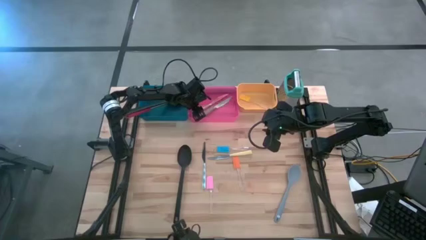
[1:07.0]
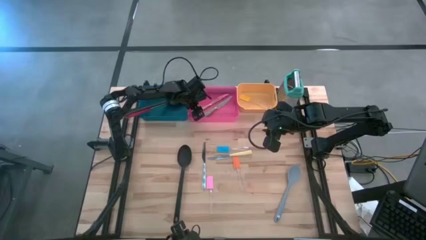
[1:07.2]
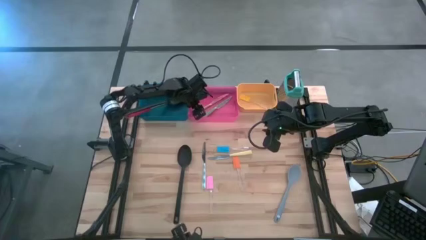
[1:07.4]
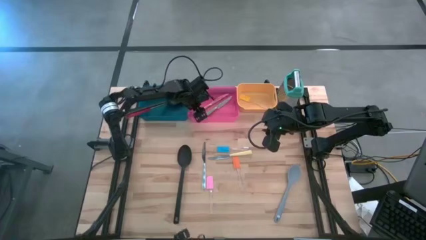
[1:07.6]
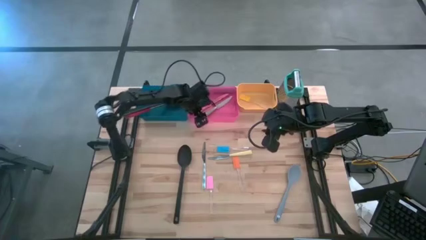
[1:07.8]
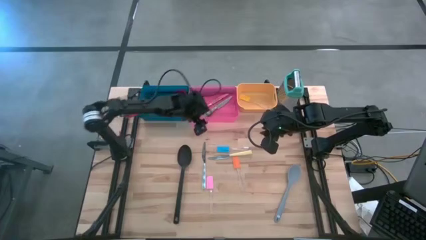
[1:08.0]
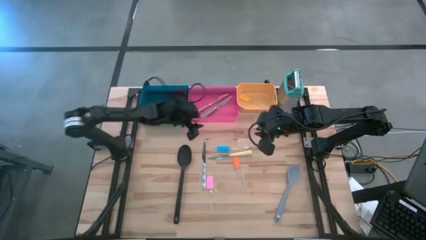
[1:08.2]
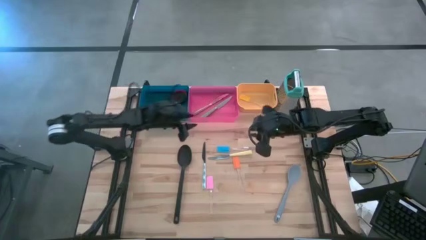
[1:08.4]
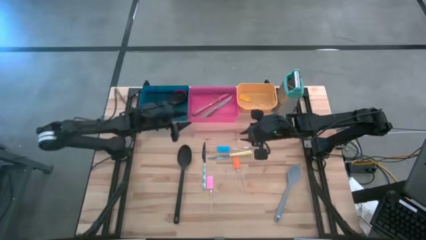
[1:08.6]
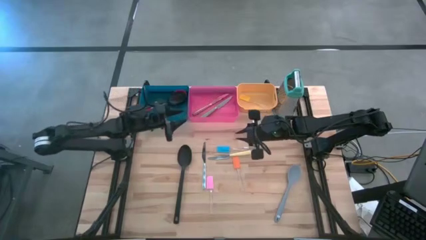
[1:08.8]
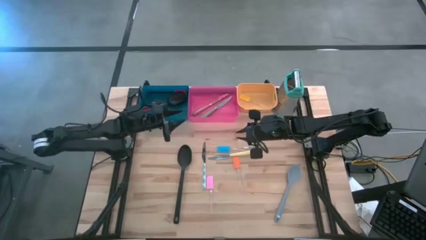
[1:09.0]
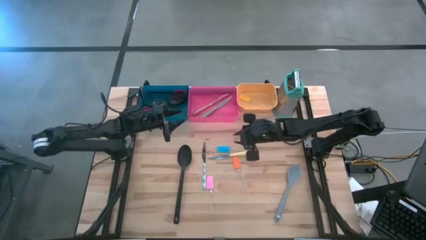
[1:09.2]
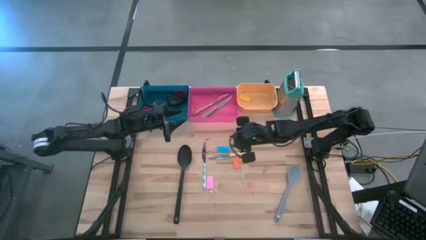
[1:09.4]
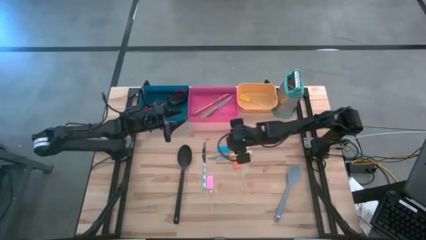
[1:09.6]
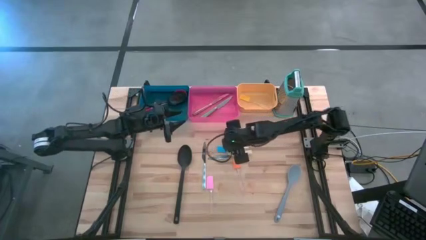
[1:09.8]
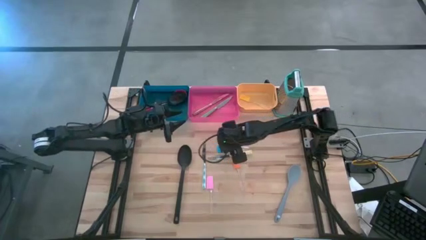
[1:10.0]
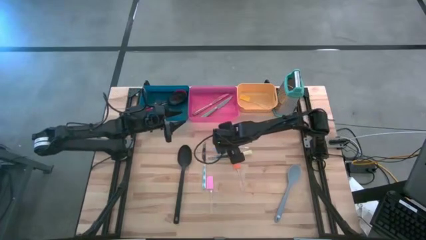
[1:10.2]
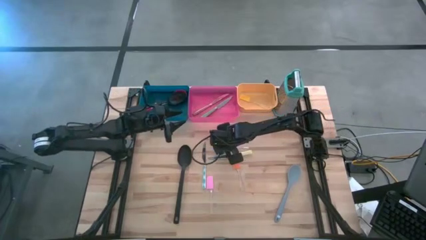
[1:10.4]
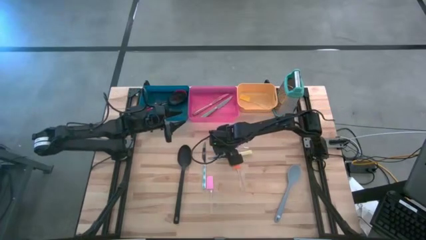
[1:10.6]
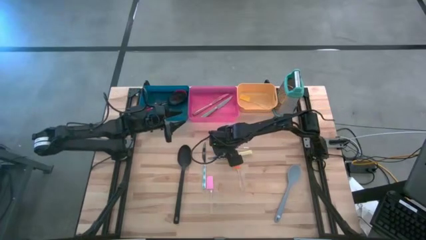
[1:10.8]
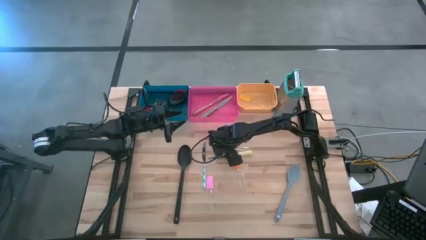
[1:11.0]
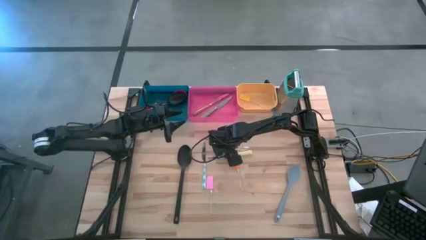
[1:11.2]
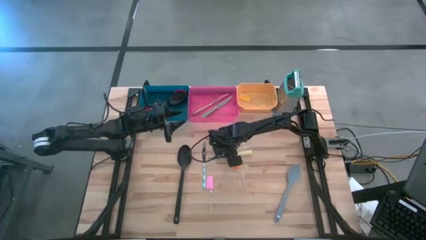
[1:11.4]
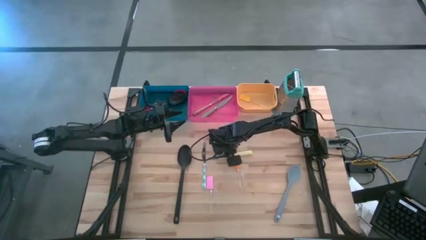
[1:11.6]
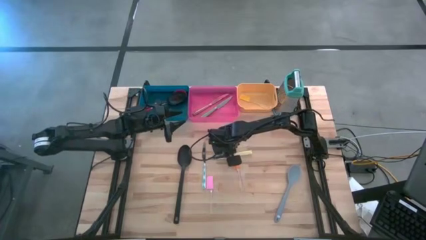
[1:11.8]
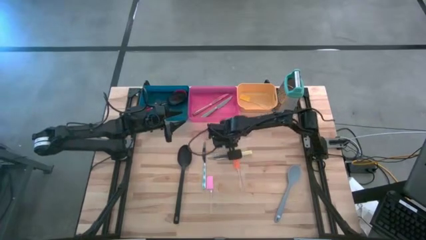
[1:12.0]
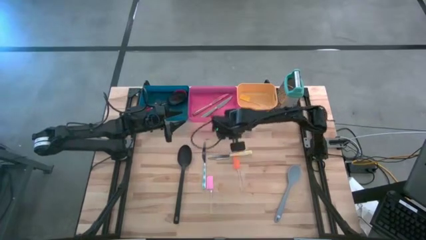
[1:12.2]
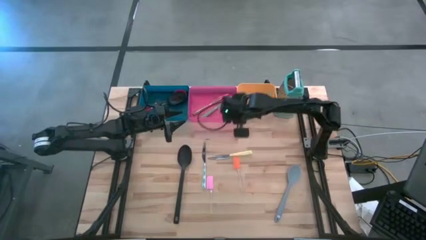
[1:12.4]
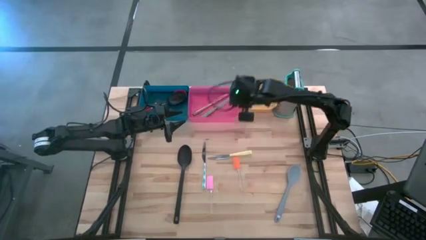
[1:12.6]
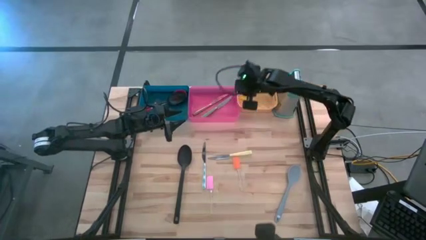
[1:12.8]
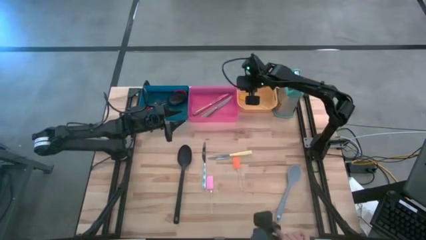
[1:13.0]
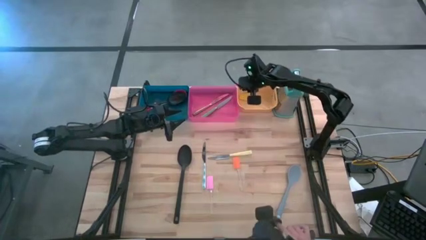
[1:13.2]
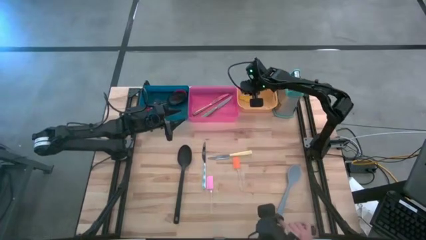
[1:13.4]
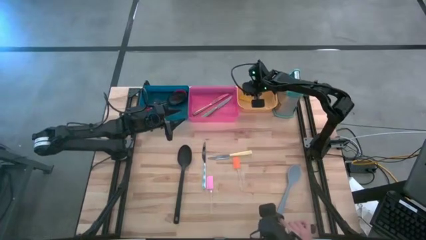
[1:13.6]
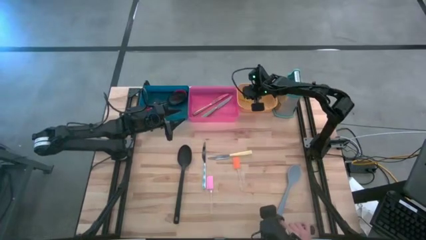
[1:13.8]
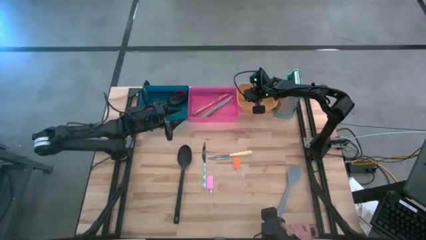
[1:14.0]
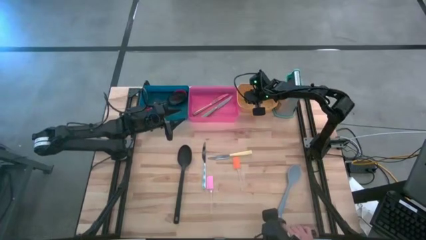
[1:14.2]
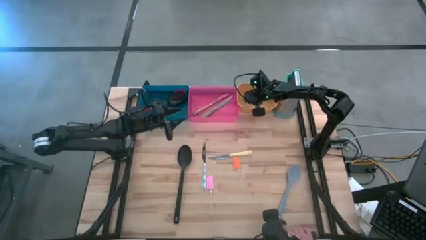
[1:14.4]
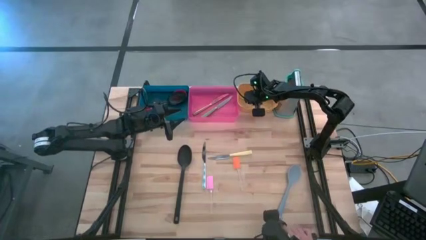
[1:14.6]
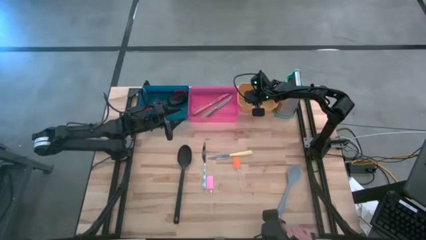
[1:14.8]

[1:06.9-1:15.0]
Task: Pick & Place Kitchen Items
Put the blue spatula into the yellow bin

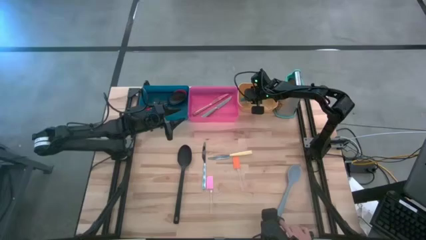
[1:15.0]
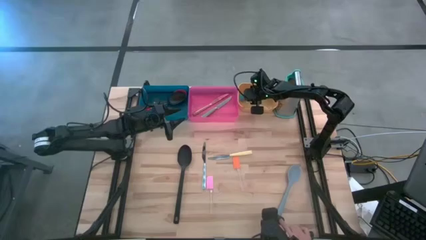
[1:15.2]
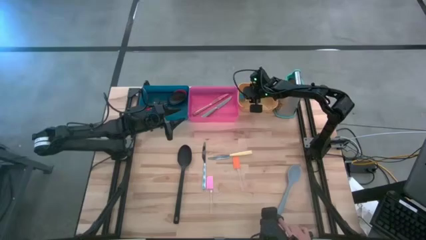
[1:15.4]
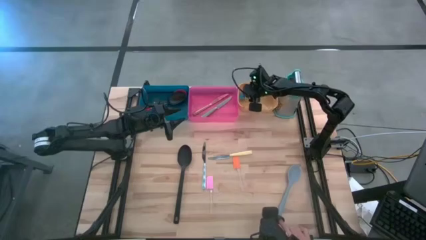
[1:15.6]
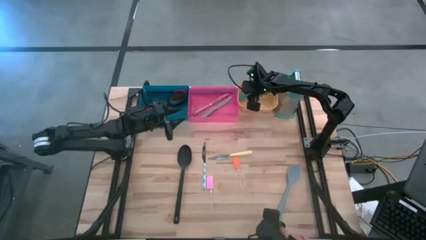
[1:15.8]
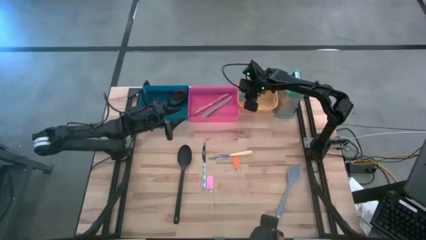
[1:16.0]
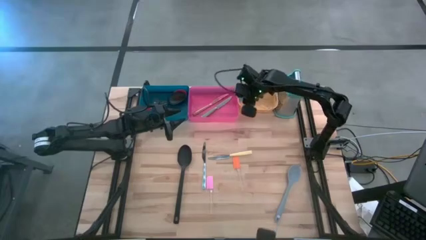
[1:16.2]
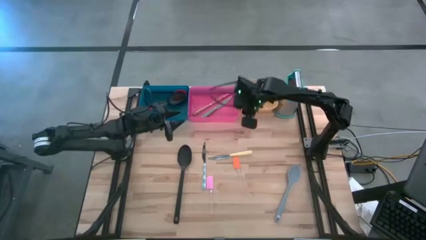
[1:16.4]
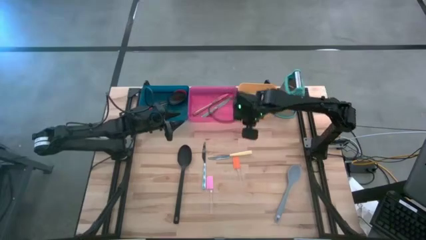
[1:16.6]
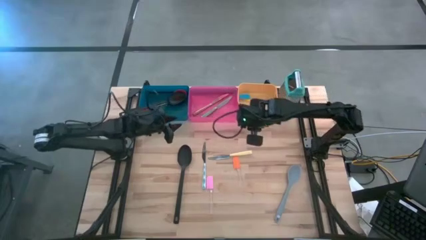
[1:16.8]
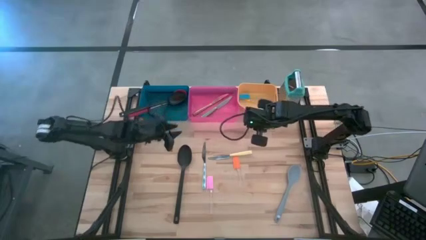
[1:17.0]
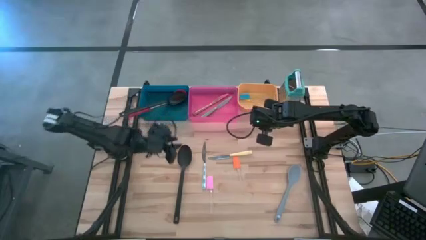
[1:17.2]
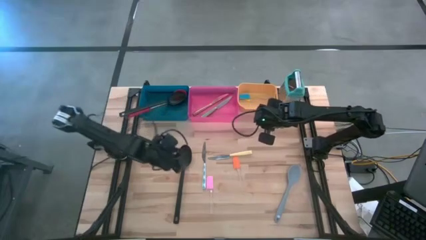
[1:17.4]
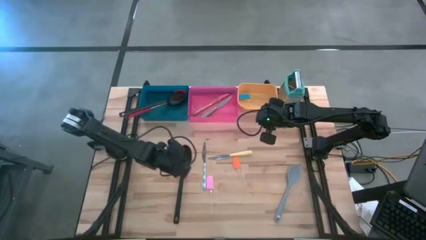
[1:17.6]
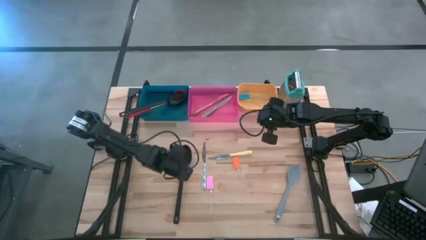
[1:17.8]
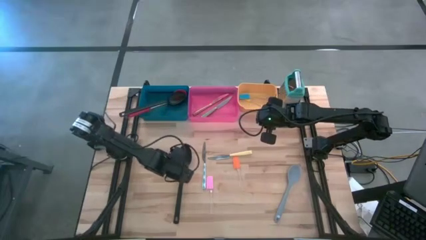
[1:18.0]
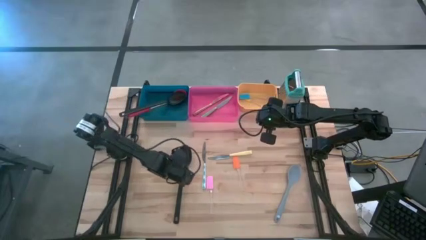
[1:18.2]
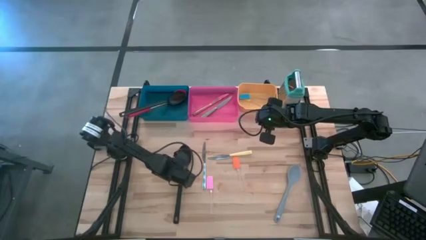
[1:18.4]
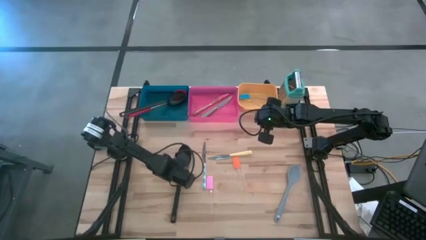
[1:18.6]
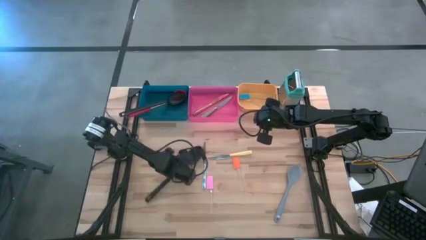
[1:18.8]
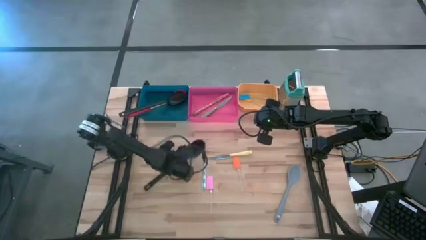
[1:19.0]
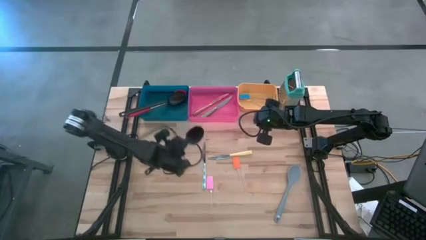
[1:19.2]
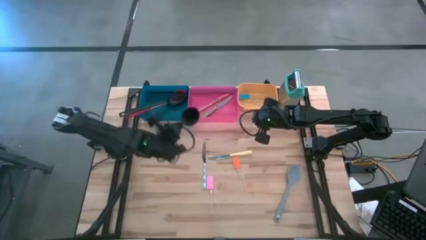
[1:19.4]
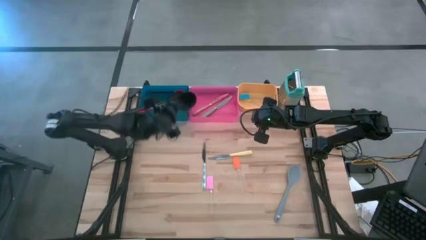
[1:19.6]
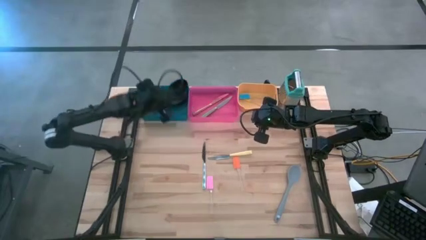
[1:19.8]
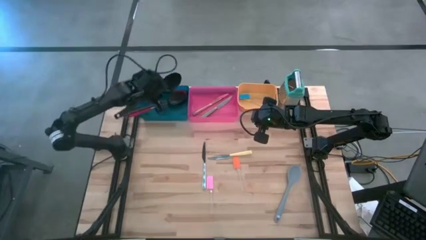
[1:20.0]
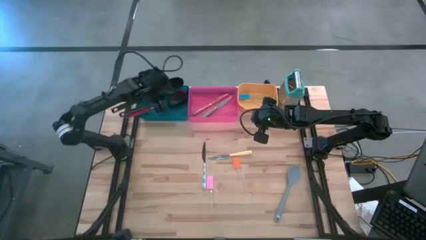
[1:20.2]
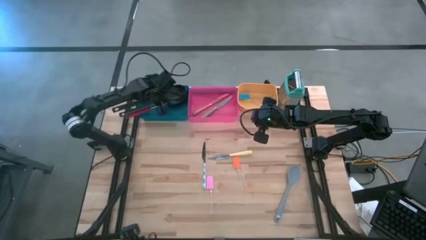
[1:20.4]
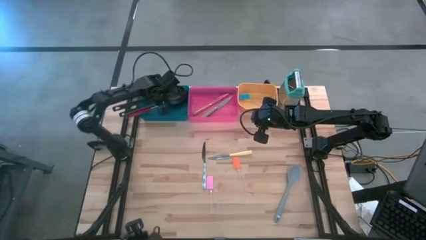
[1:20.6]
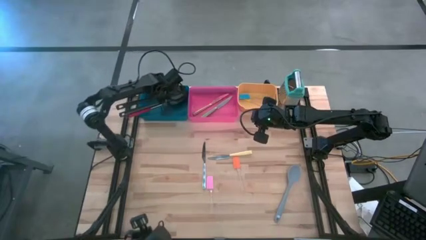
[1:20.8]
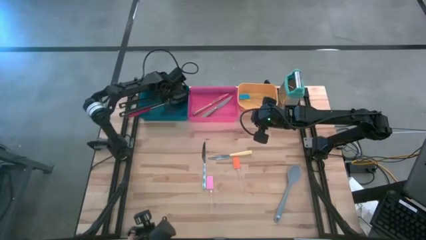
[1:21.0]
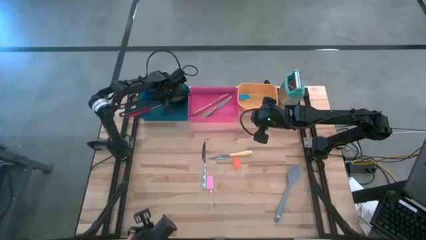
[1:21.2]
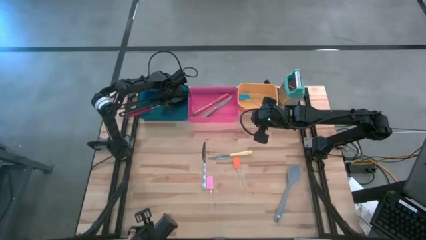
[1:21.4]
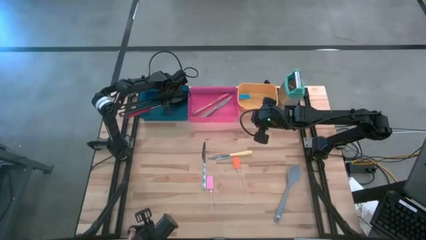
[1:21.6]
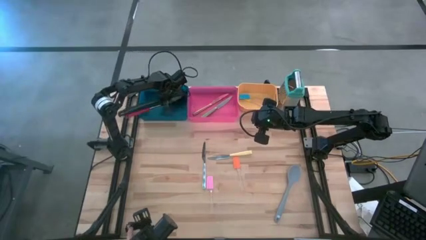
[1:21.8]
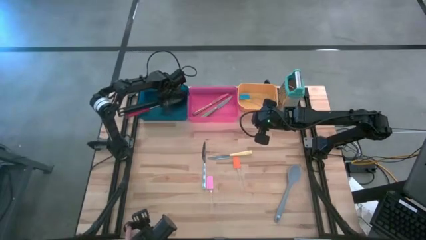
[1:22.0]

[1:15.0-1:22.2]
Put the black serving spoon into the blue bin
